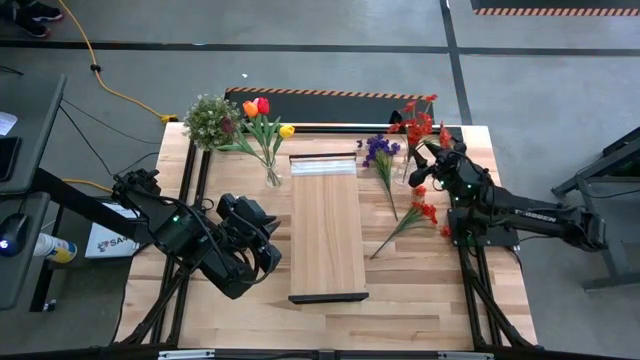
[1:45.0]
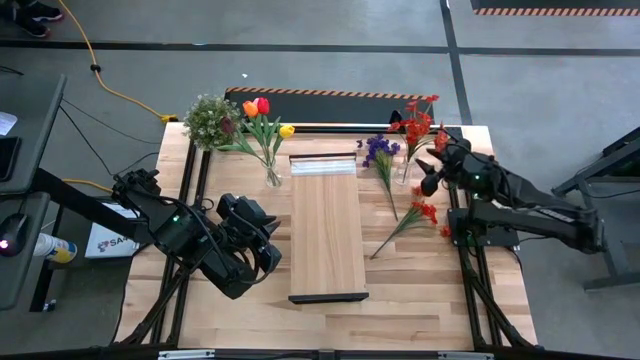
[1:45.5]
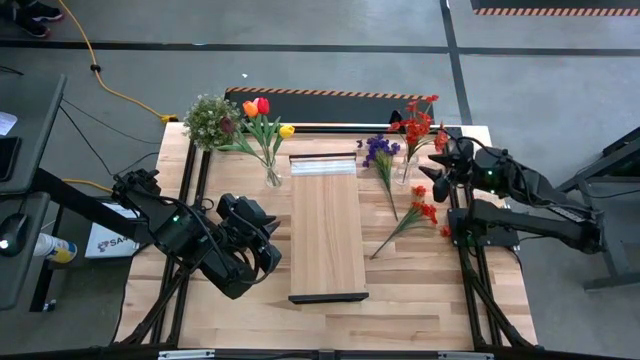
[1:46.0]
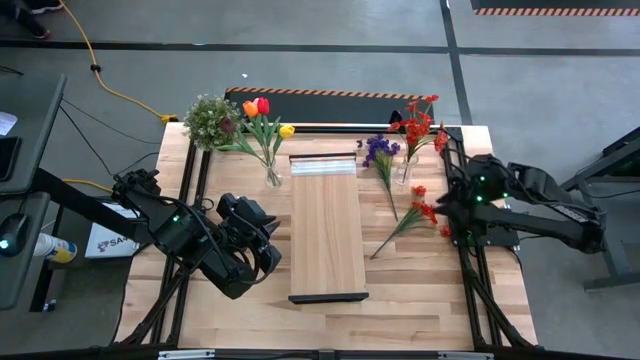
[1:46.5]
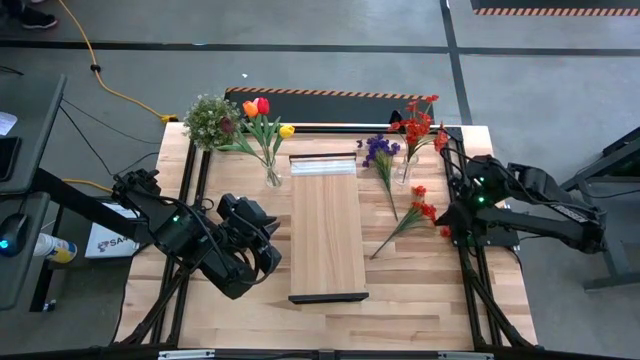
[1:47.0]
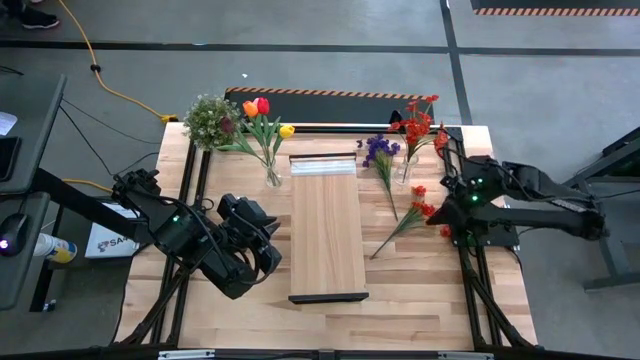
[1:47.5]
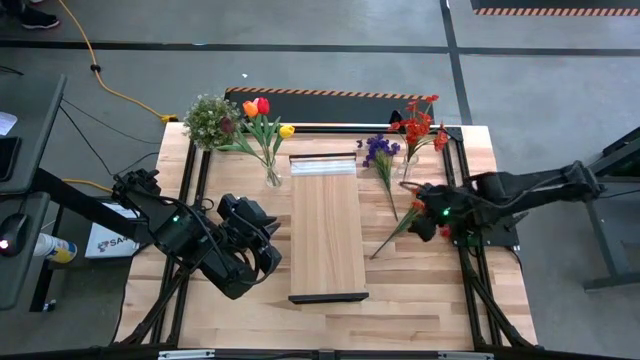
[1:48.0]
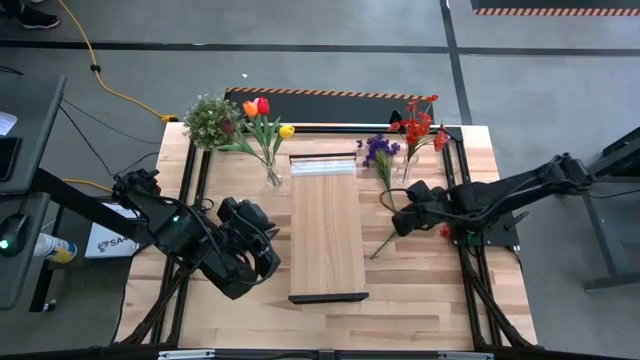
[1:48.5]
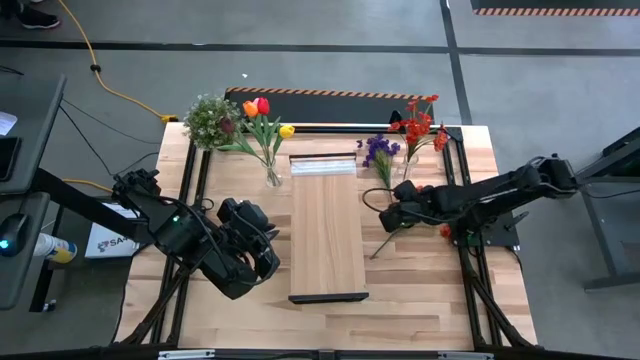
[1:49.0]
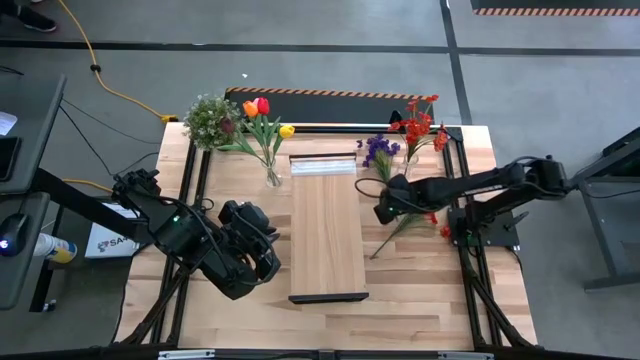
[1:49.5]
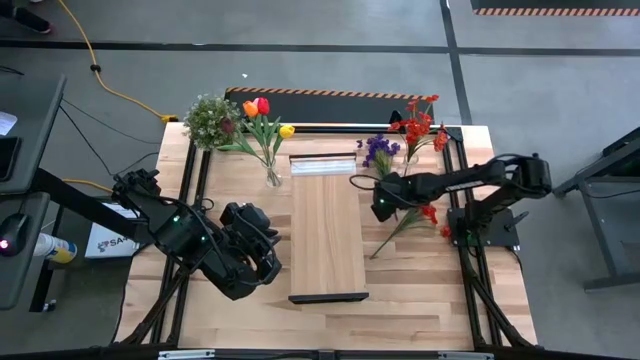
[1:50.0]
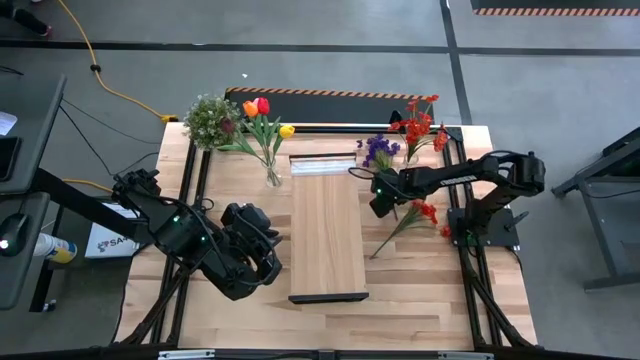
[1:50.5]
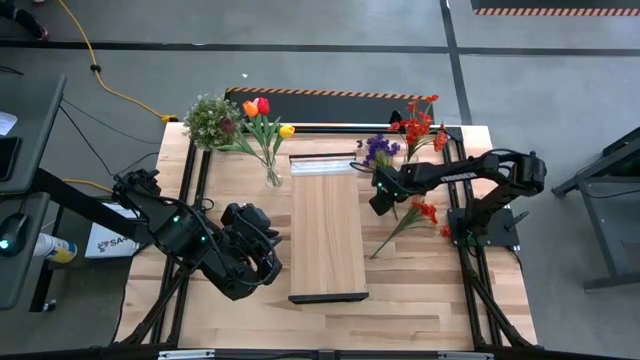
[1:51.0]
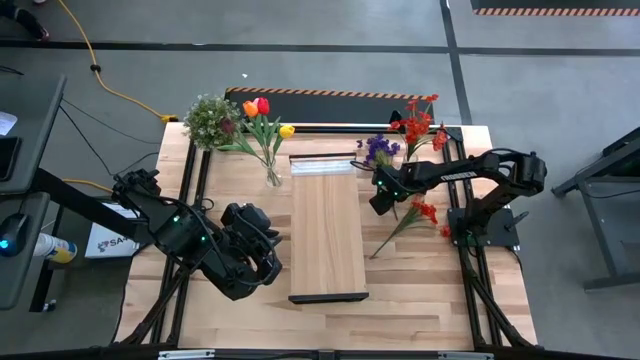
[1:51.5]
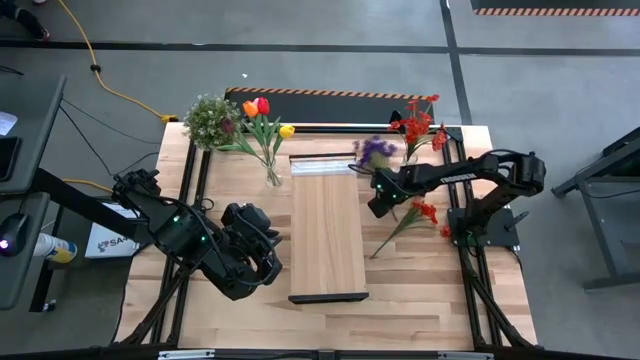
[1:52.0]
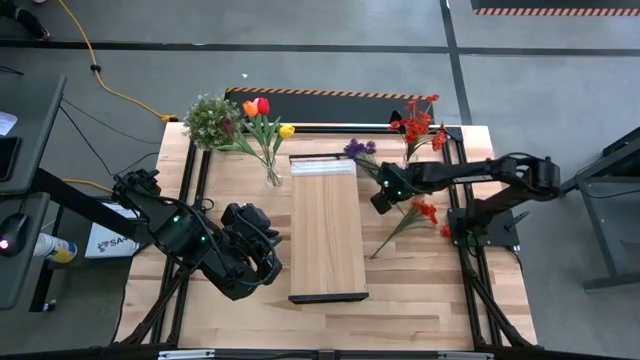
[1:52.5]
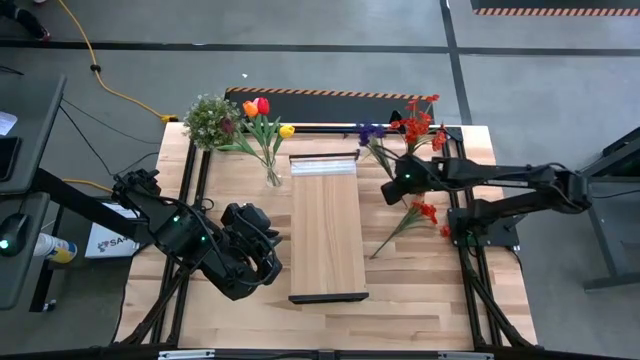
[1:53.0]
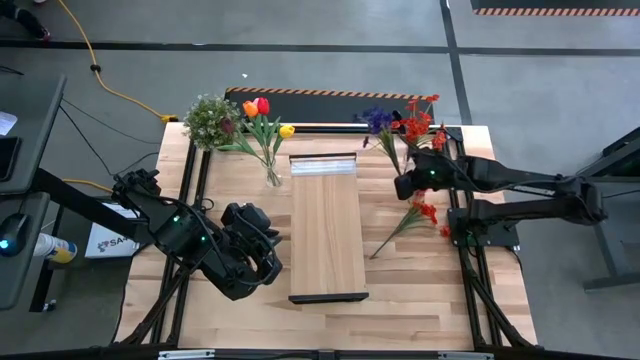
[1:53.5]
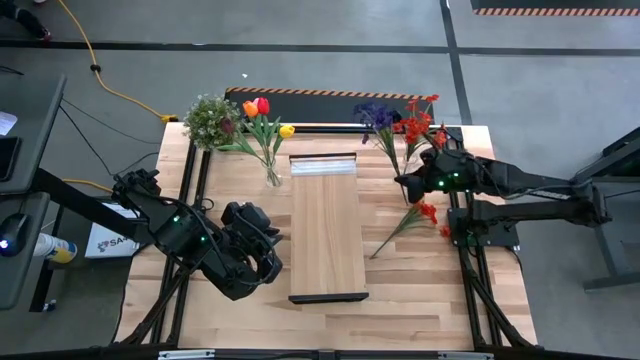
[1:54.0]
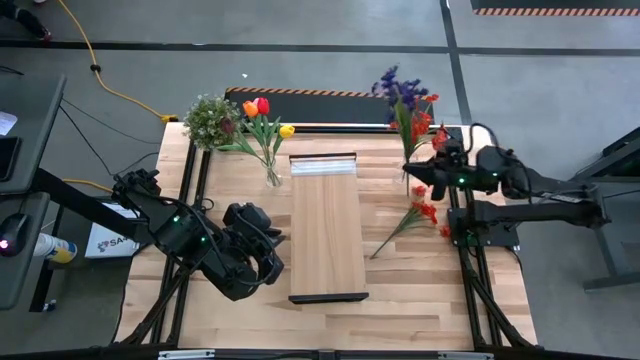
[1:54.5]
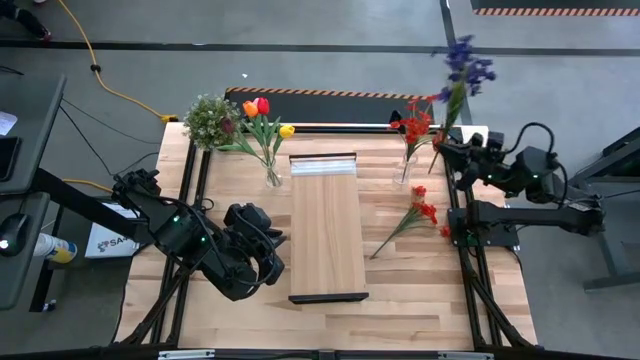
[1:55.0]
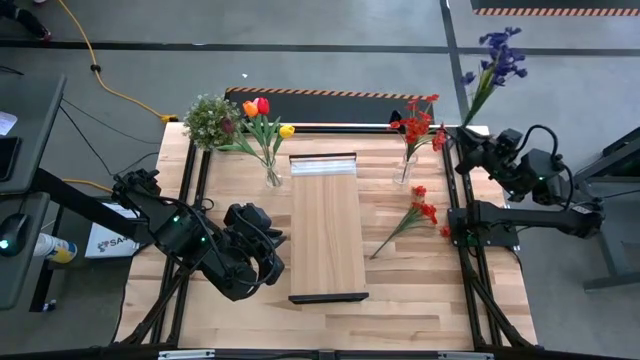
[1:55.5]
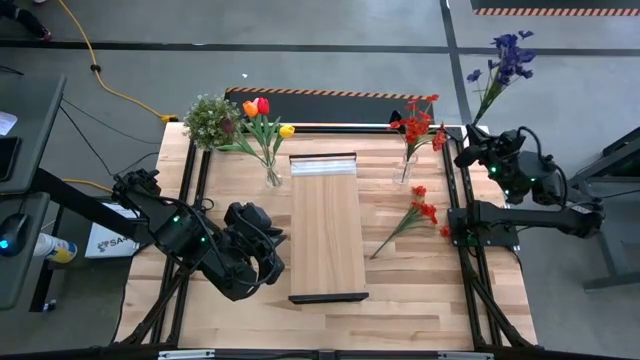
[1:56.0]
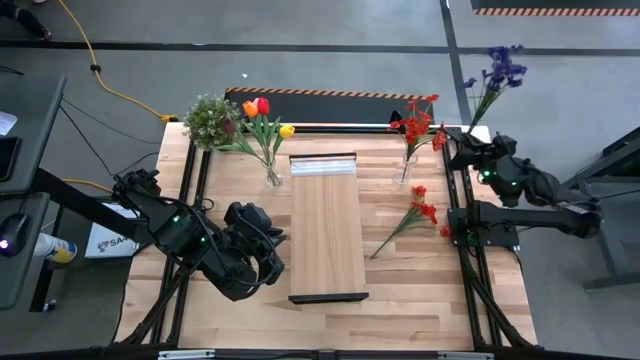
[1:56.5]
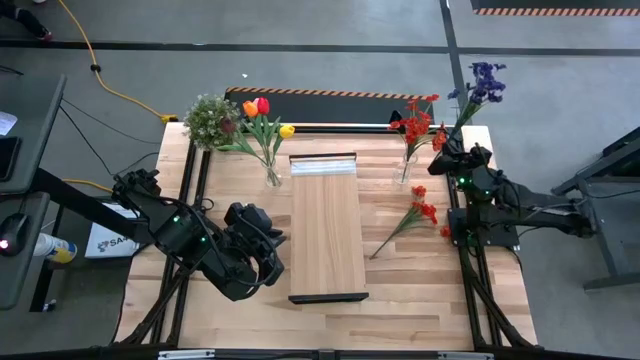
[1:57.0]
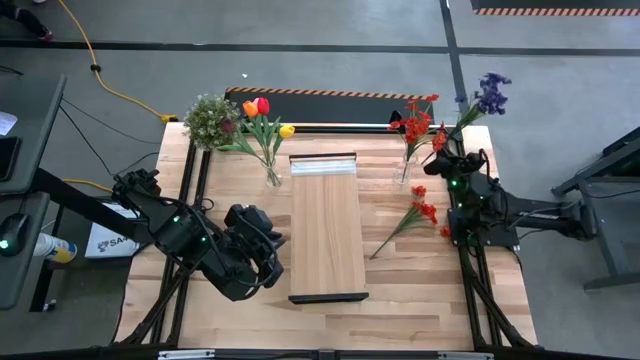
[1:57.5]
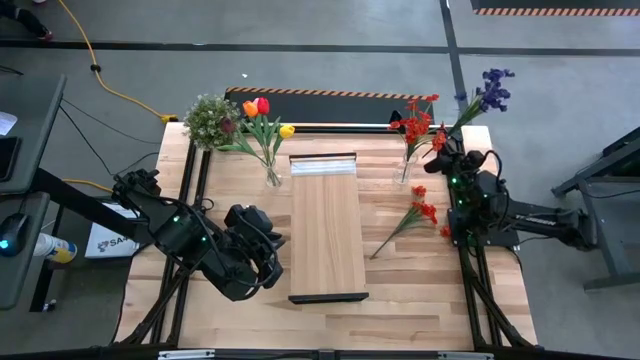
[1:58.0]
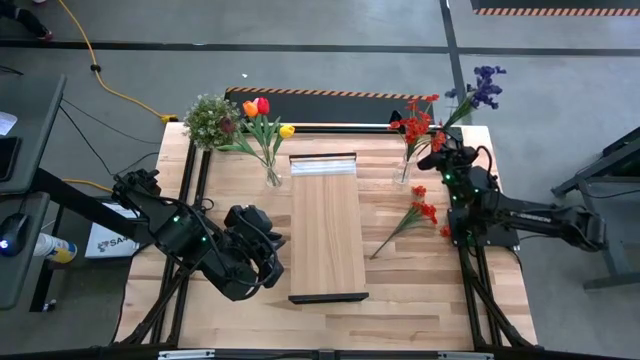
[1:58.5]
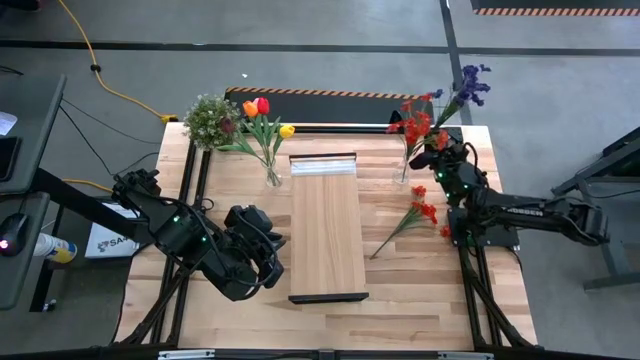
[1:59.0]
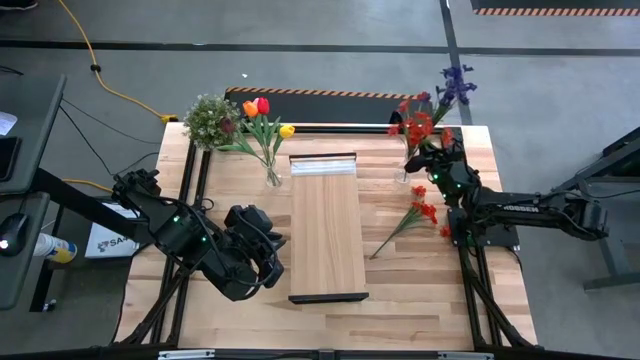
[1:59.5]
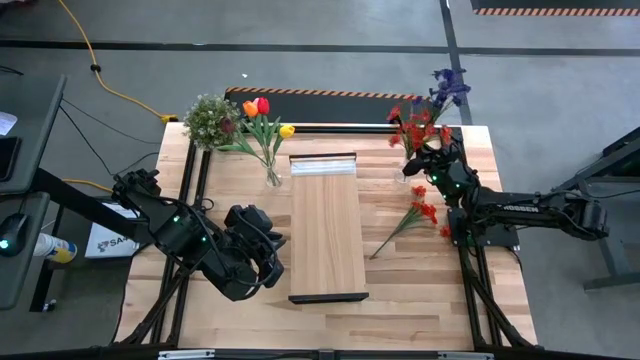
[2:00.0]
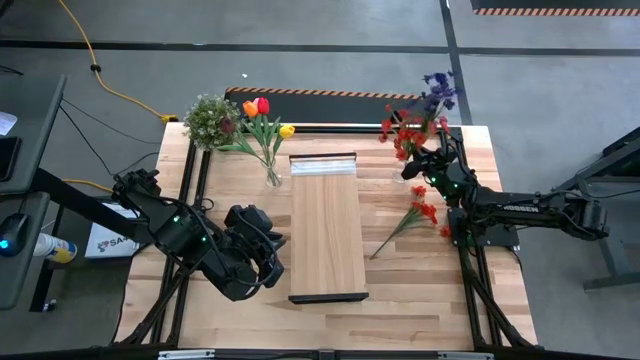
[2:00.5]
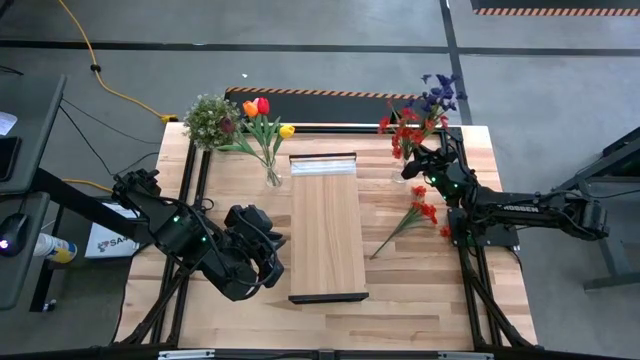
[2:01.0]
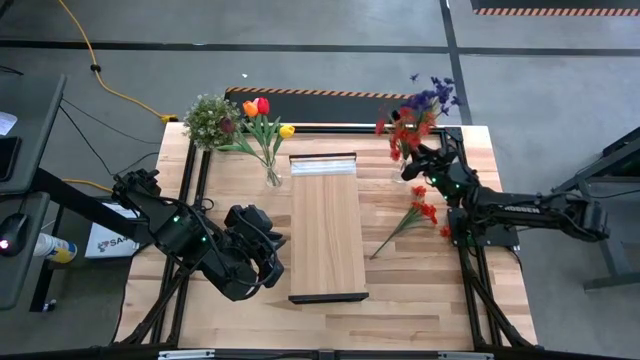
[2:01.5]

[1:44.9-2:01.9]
Task: Pick and place flowers into a vace then onto a shelf
Put the violet flowers into the right transparent vase

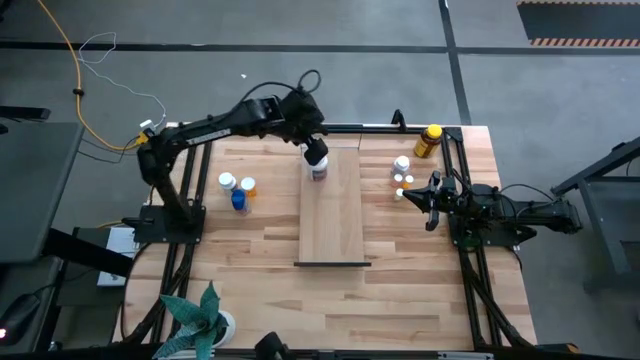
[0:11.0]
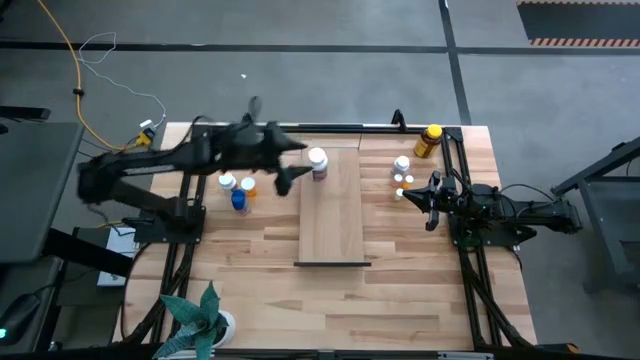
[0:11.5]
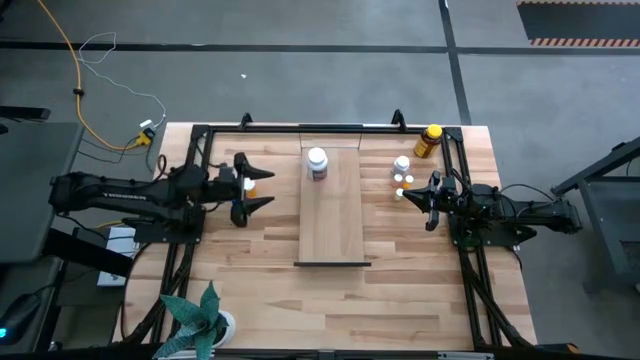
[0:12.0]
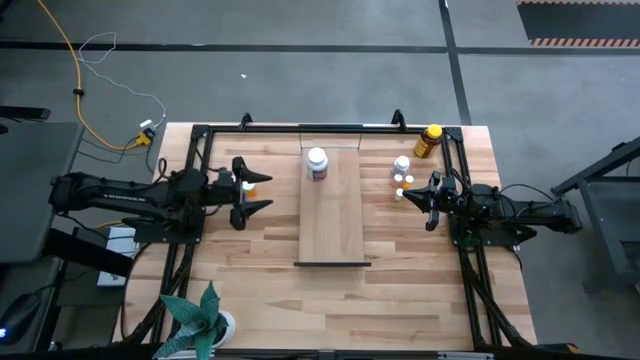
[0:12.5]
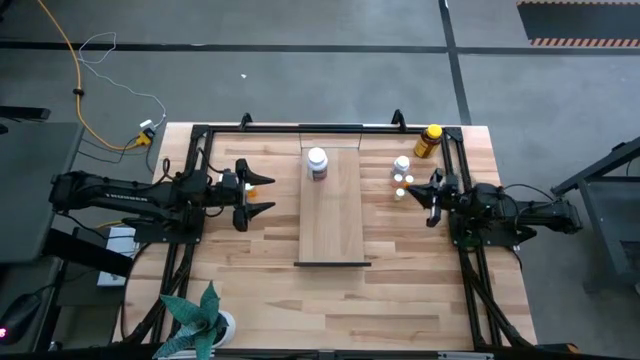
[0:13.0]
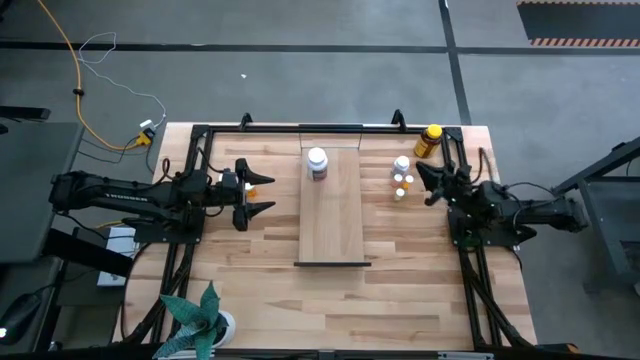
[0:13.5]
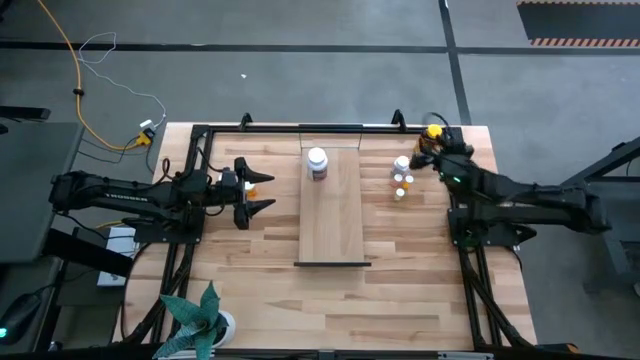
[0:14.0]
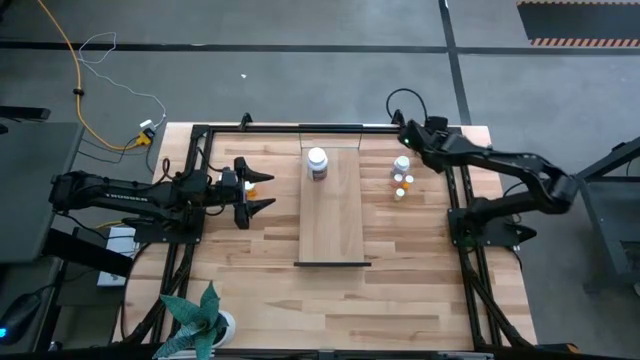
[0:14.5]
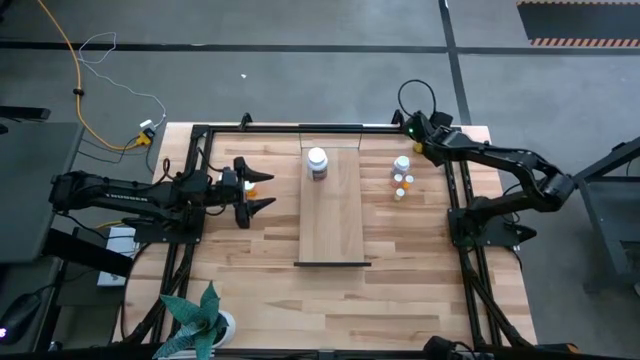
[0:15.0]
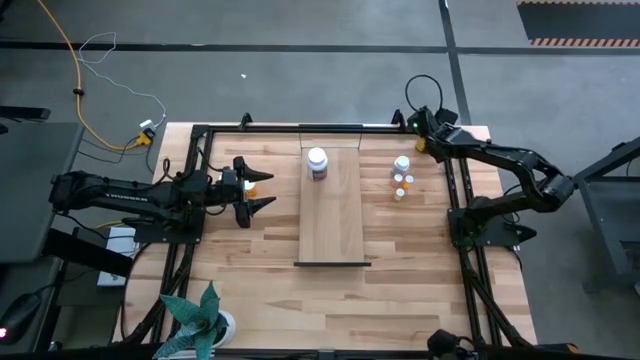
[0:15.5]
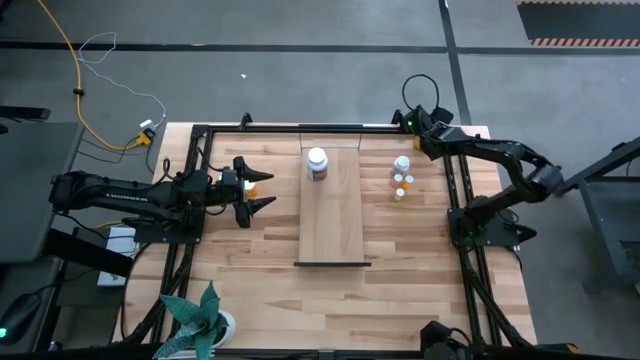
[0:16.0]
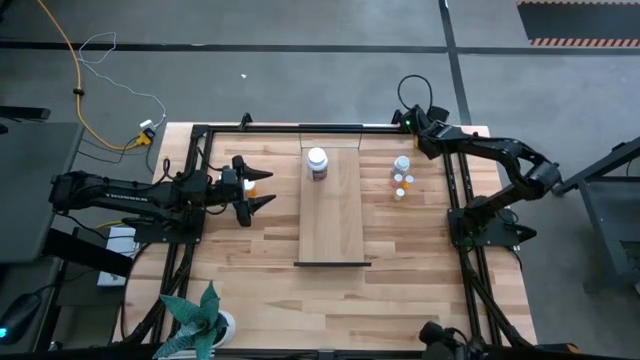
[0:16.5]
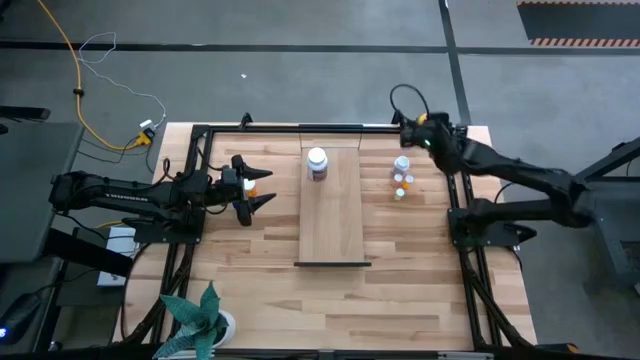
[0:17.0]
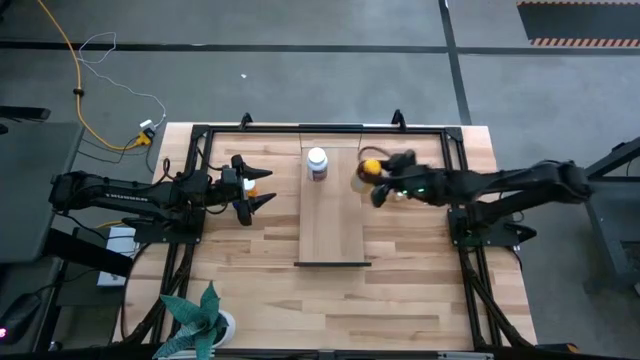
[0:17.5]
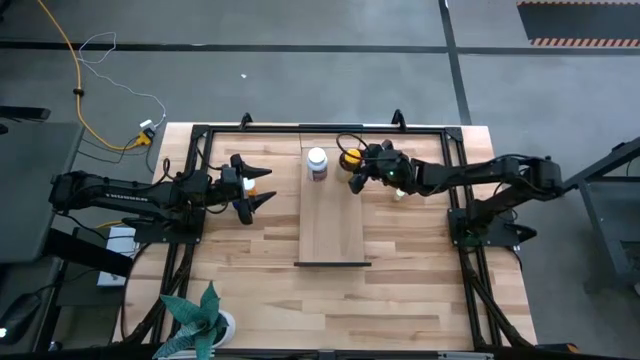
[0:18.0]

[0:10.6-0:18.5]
Task: Pick and place medicine bottles onto shelf by color
Put the large yellow pill bottle on the shelf
